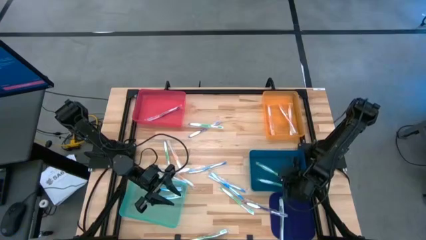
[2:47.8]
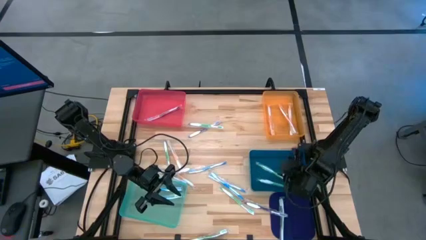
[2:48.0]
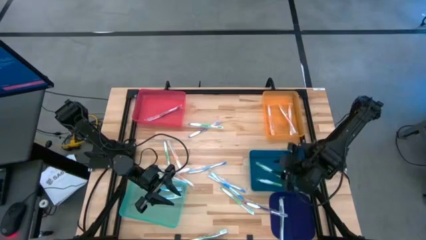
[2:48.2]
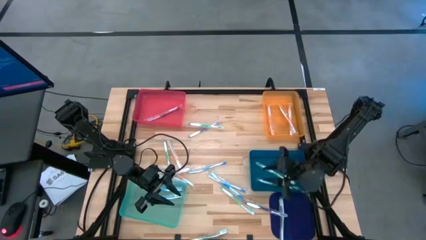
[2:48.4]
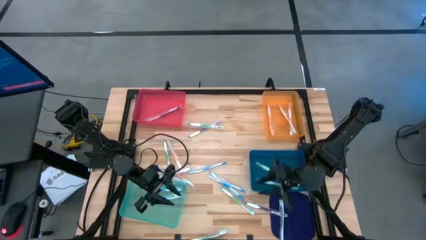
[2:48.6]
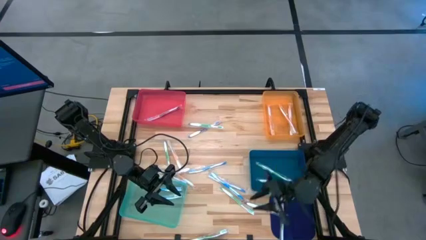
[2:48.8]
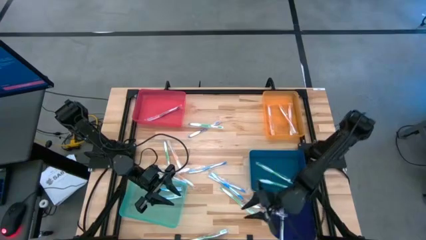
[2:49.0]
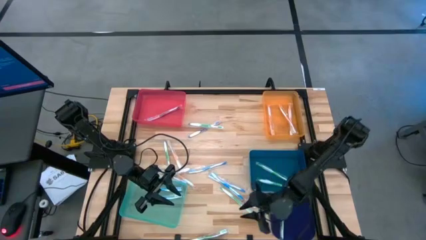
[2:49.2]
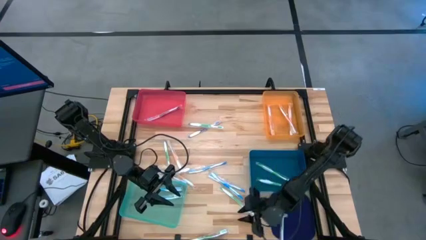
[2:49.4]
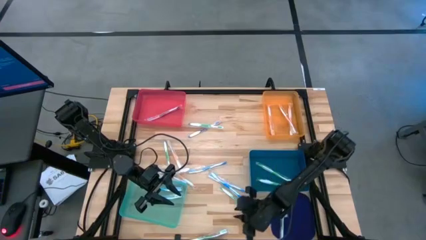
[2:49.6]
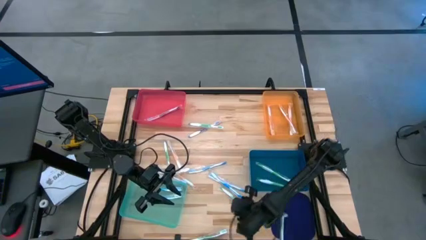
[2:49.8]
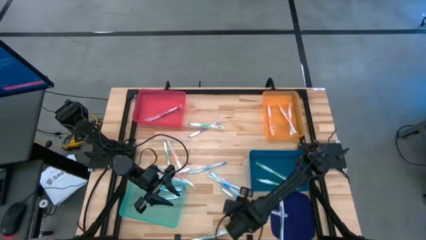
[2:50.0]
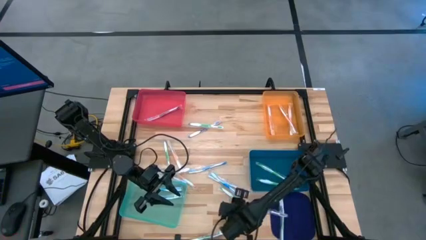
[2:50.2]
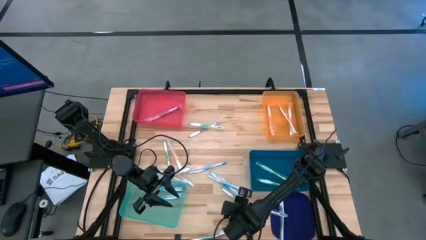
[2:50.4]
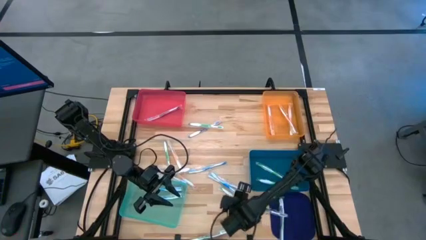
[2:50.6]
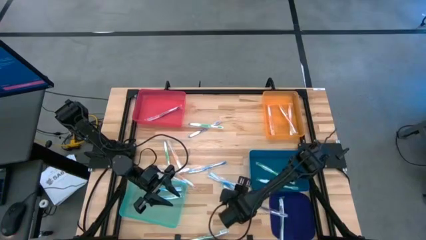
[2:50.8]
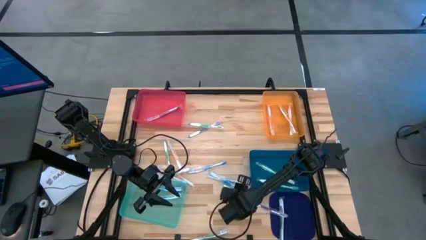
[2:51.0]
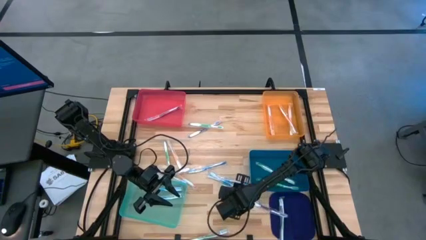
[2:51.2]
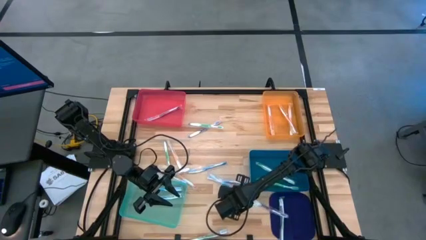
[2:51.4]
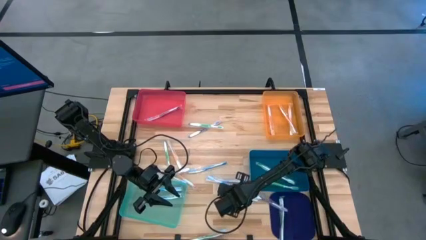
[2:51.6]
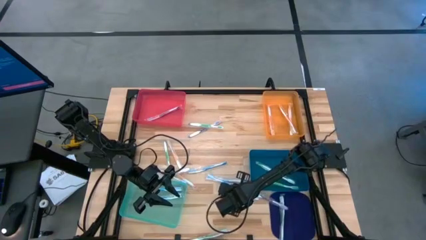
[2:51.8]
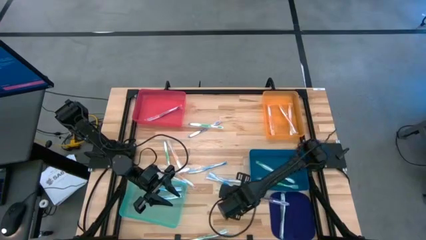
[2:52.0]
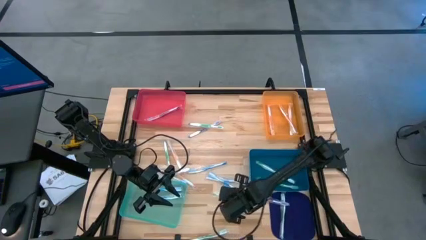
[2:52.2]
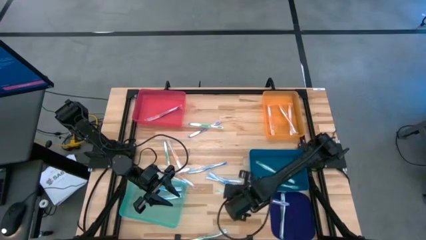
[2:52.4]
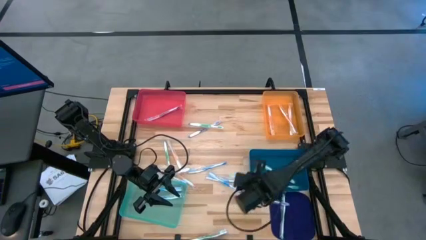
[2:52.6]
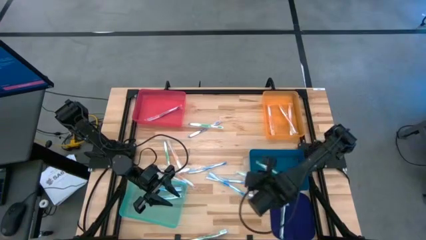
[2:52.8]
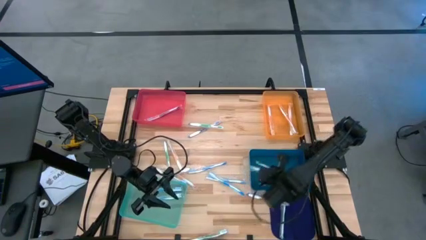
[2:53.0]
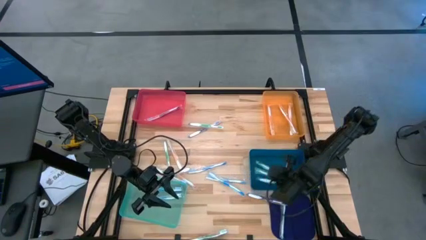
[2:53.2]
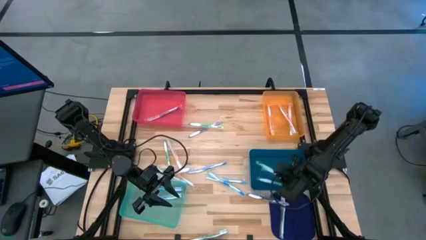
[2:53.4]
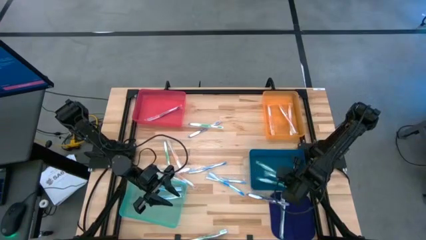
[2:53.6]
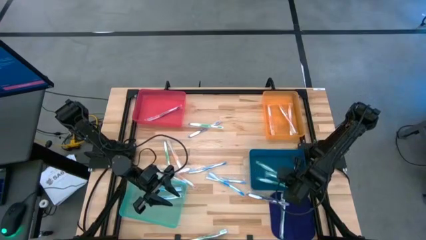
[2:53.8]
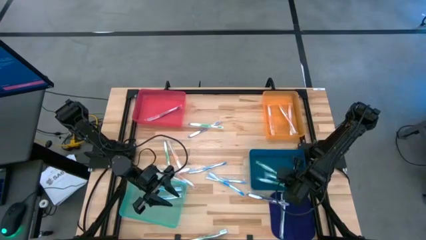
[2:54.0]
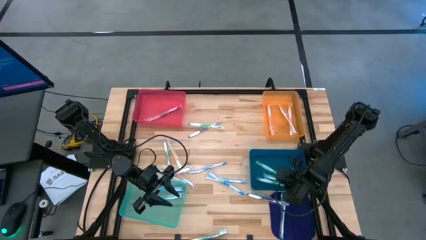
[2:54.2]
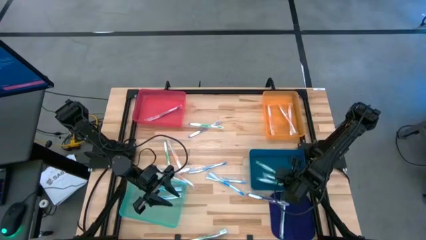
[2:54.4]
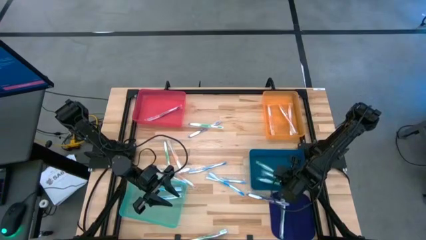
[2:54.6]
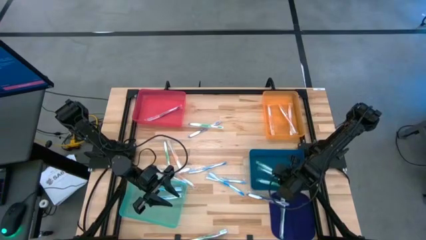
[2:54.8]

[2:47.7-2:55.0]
Task: Pick & Place Toothbrushes
Put the green toothbrush into the blue bin

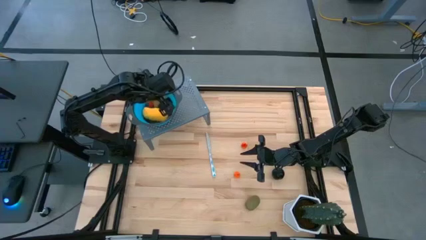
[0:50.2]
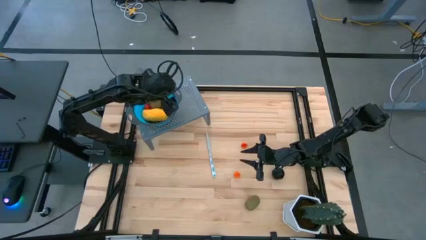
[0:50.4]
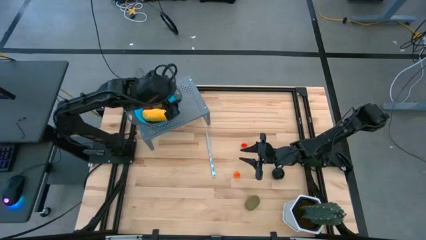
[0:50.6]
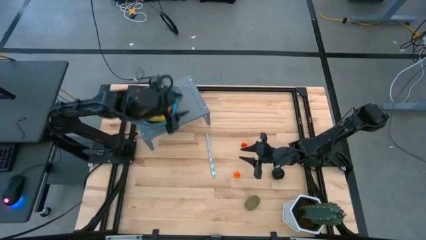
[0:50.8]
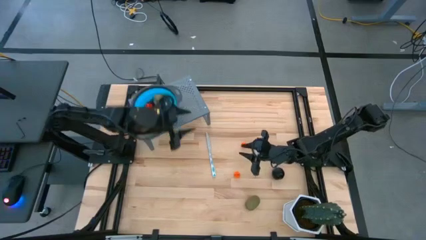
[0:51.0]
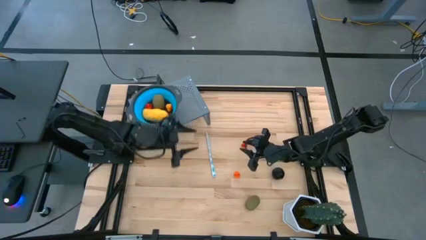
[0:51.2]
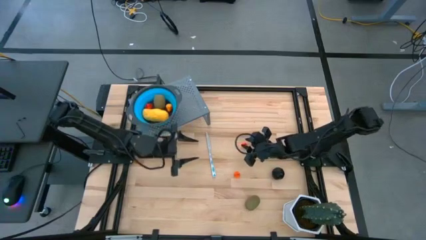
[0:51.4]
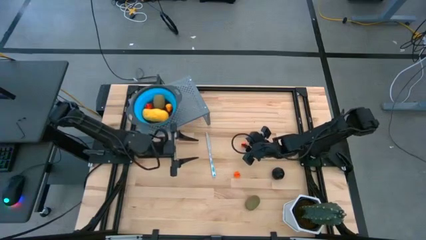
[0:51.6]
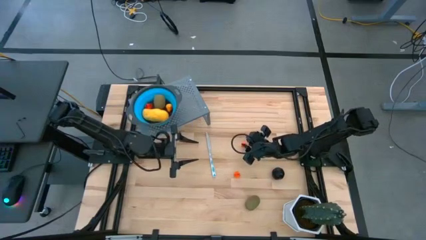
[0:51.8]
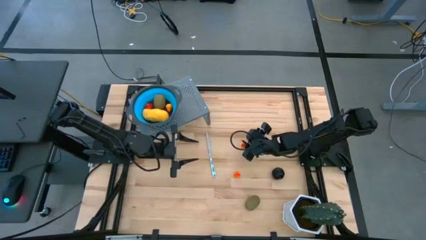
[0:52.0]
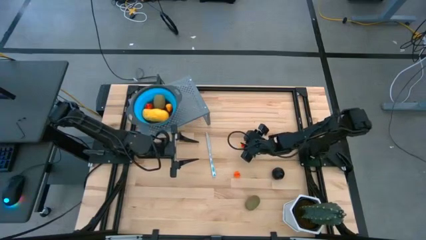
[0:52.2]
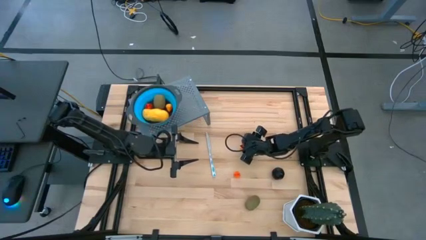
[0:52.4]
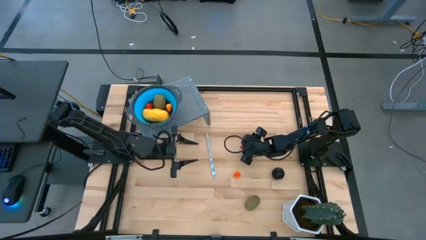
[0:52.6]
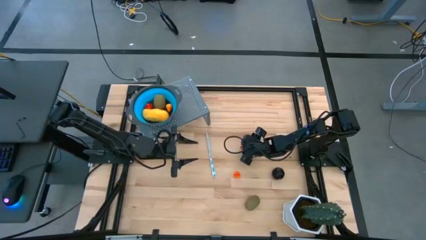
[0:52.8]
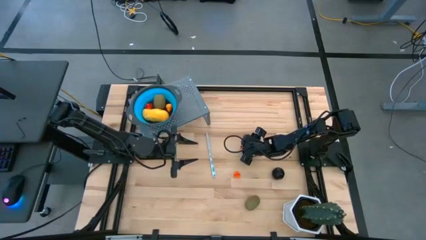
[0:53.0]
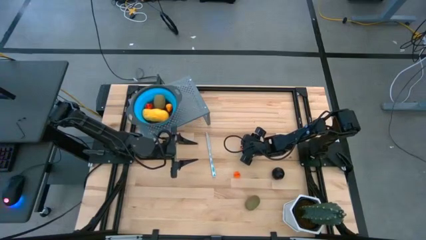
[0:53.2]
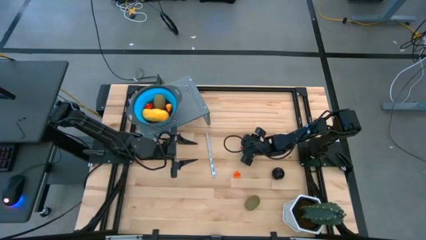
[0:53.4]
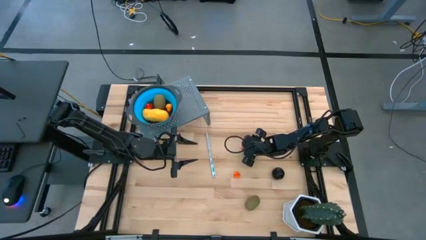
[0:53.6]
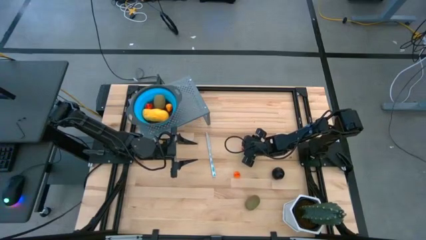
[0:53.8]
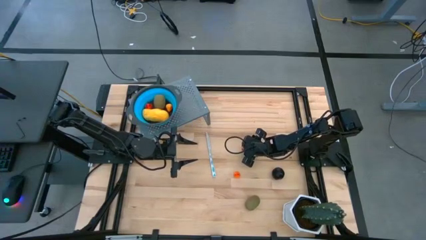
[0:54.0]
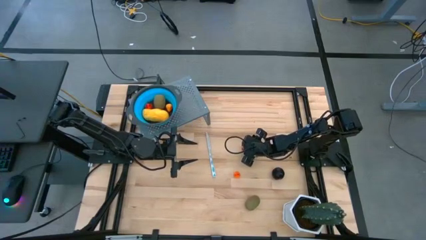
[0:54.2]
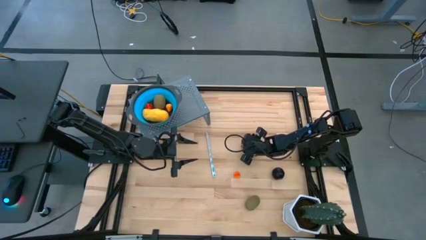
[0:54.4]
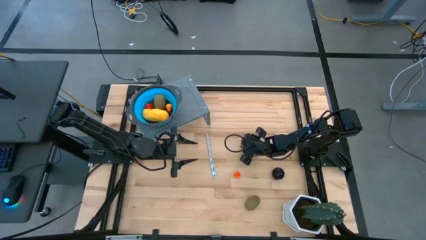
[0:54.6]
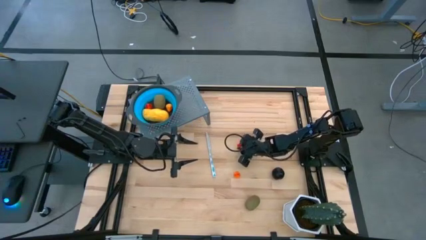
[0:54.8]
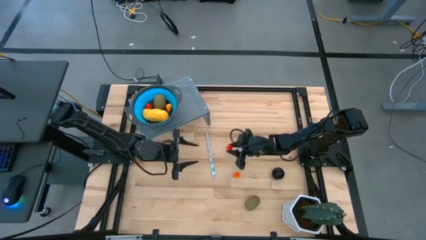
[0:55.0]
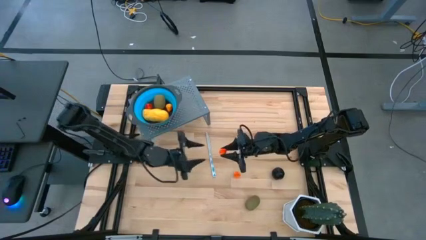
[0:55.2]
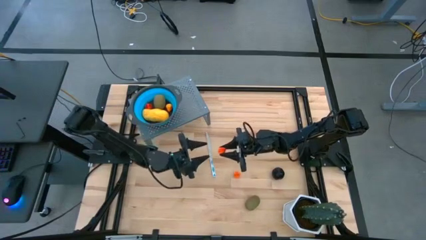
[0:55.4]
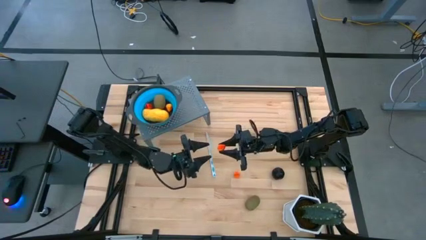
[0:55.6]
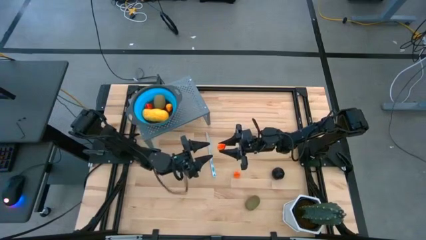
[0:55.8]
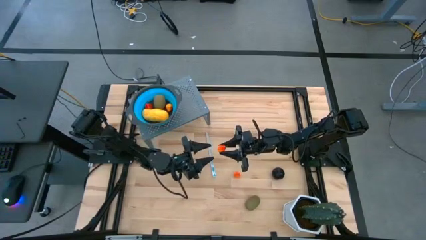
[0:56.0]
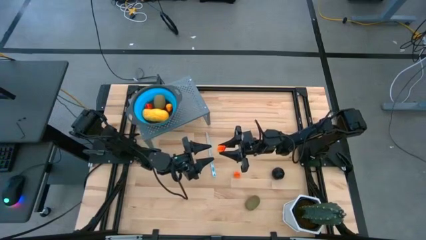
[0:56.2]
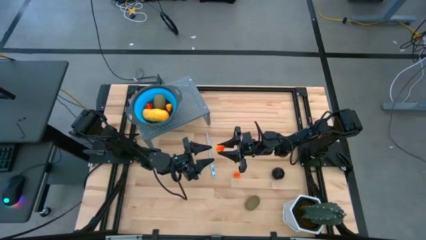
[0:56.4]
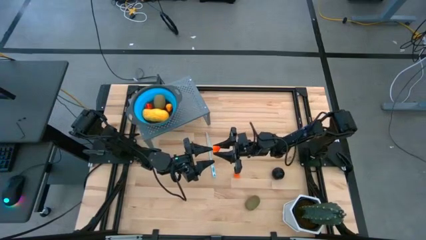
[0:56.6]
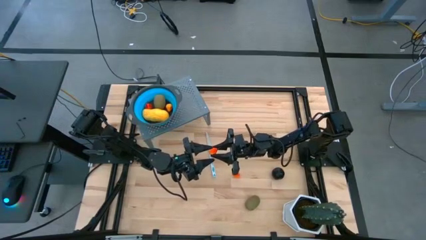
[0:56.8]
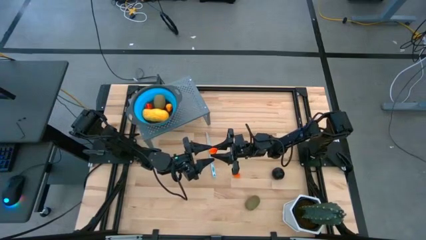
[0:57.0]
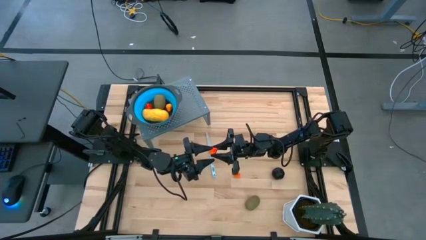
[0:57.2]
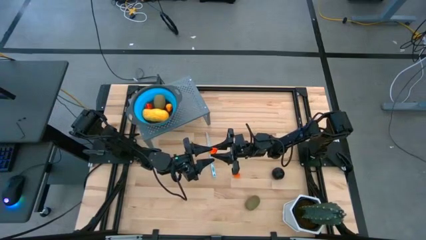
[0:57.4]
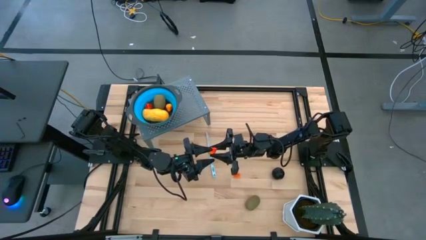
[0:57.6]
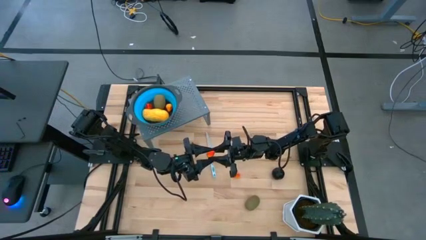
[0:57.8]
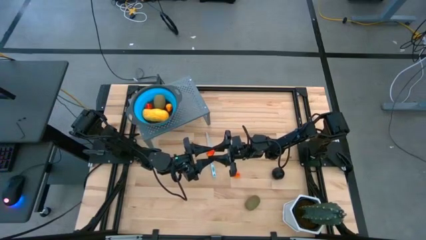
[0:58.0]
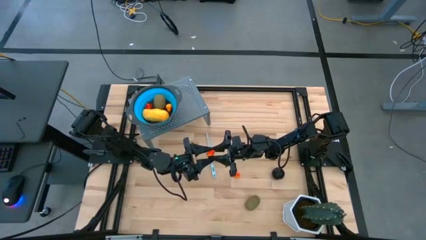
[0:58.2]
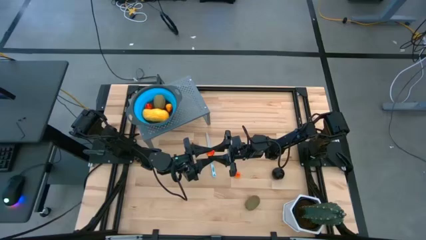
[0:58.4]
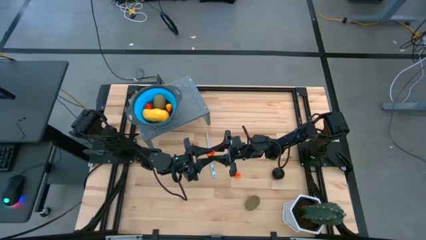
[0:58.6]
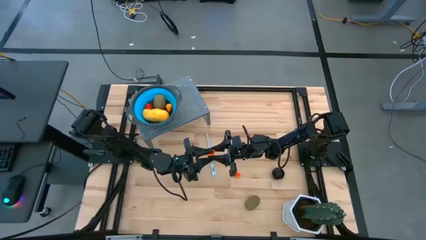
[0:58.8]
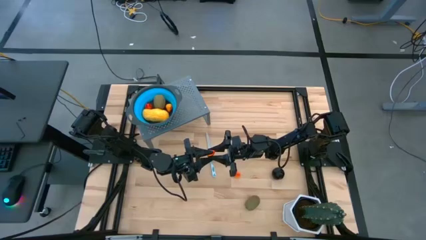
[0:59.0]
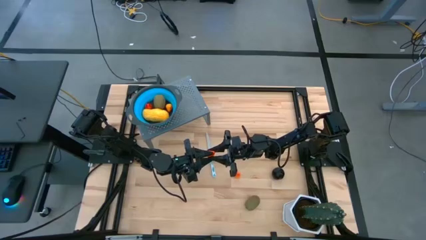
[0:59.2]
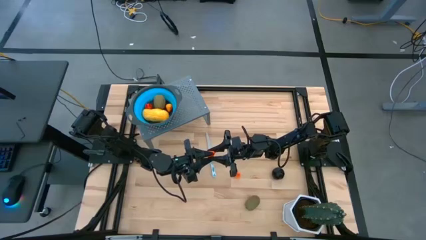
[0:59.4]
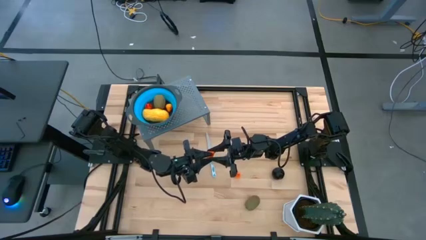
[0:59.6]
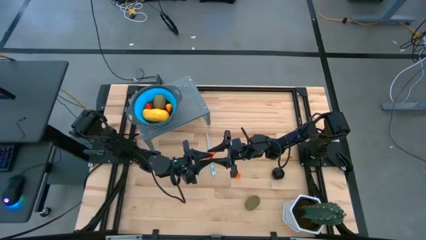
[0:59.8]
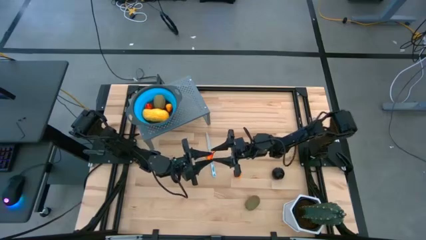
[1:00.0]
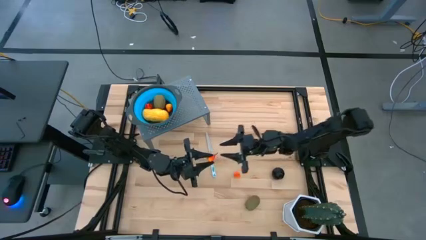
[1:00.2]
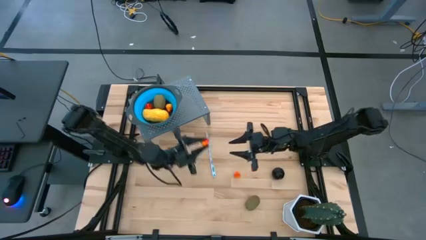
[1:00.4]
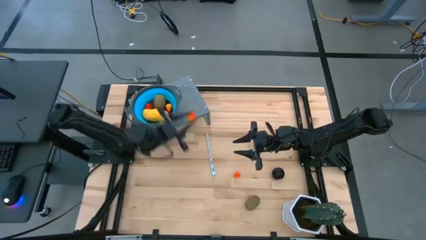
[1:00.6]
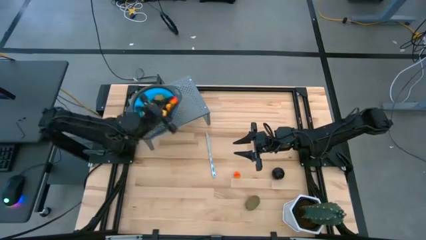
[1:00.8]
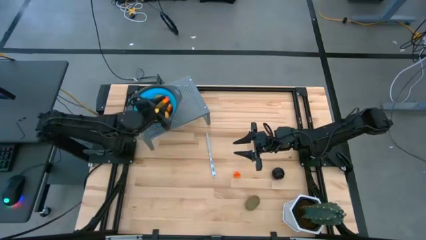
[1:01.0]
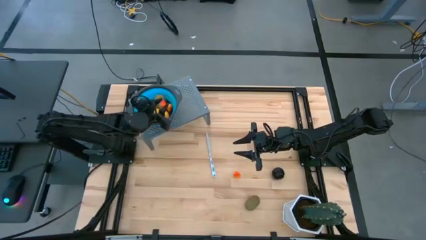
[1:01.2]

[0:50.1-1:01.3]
Task: Pick & Place Fruit
Put the orange peach into the blue strainer bowl on the shelf
